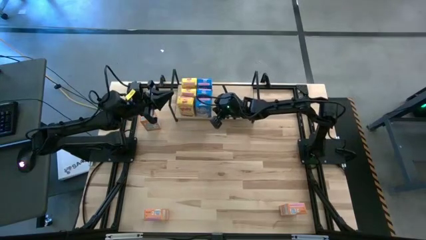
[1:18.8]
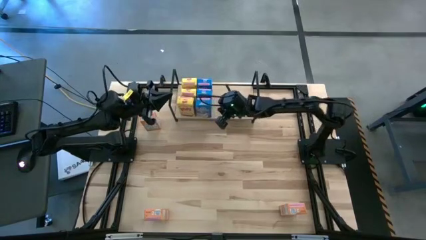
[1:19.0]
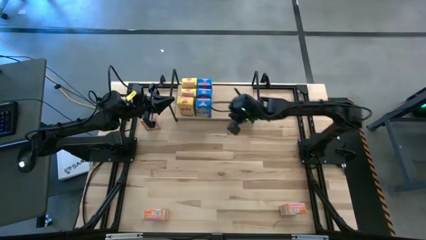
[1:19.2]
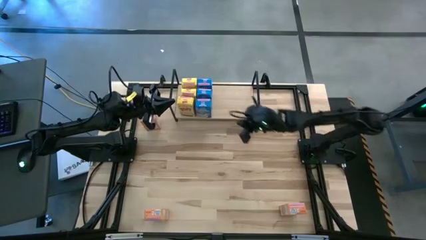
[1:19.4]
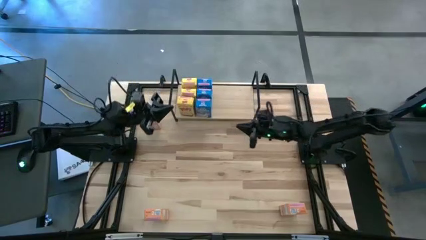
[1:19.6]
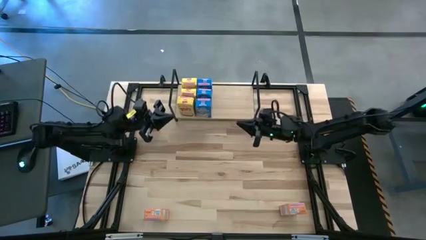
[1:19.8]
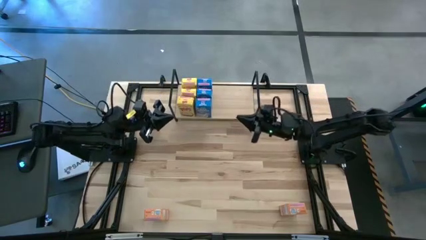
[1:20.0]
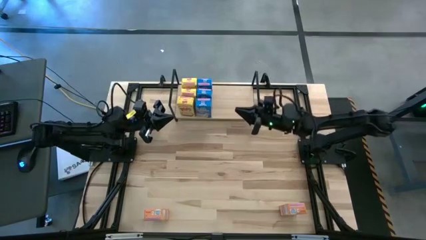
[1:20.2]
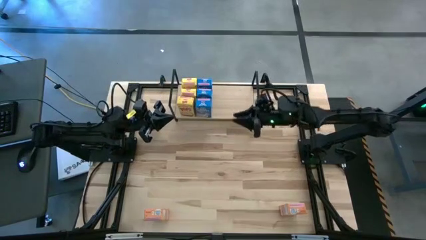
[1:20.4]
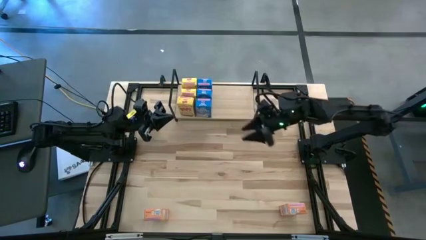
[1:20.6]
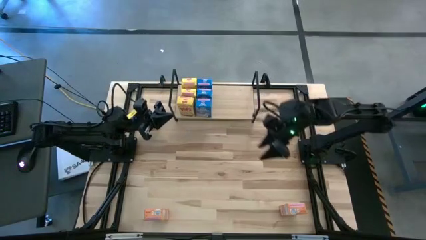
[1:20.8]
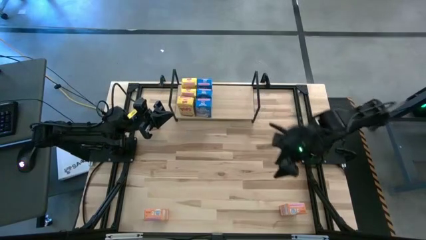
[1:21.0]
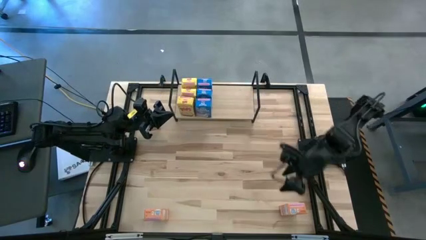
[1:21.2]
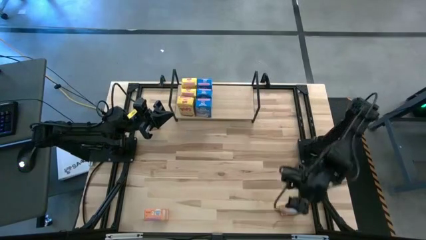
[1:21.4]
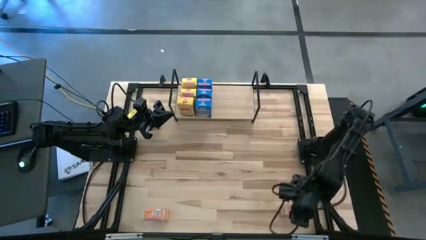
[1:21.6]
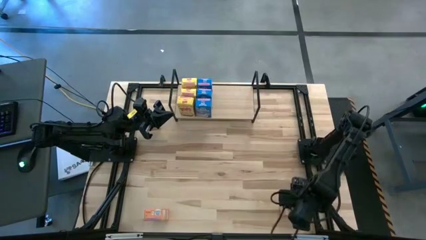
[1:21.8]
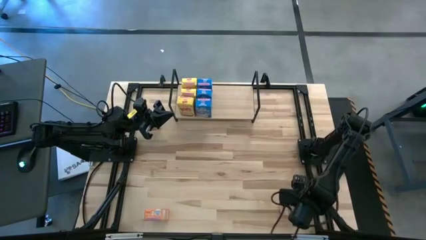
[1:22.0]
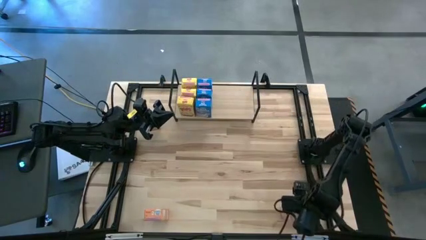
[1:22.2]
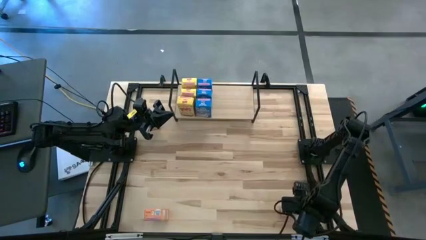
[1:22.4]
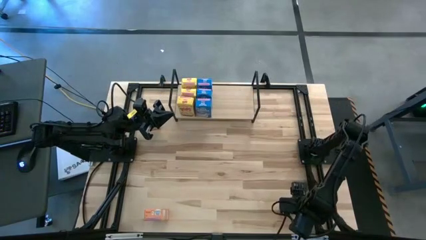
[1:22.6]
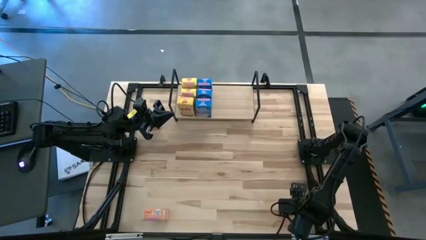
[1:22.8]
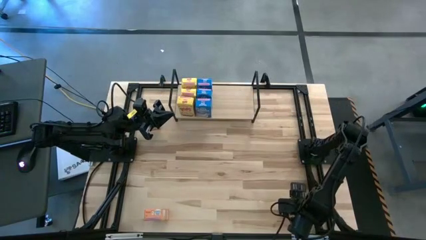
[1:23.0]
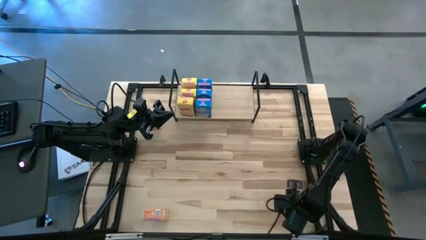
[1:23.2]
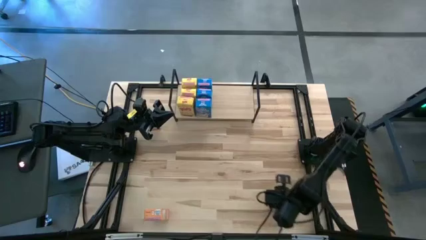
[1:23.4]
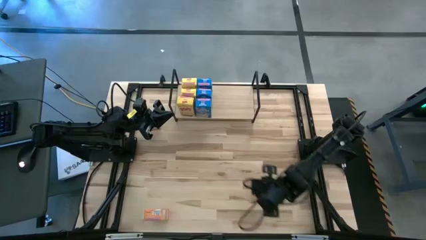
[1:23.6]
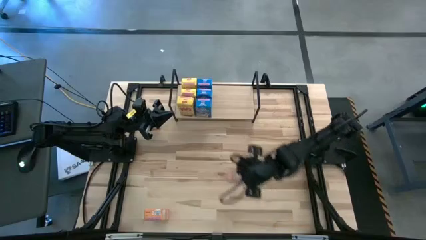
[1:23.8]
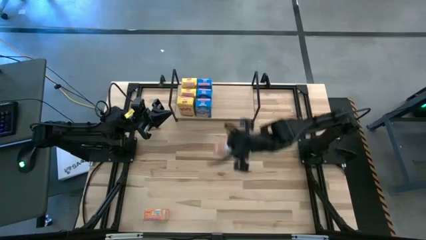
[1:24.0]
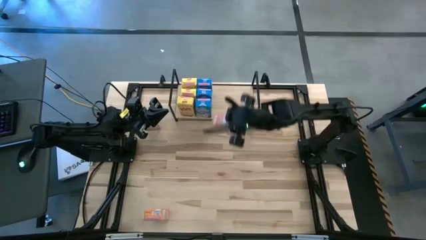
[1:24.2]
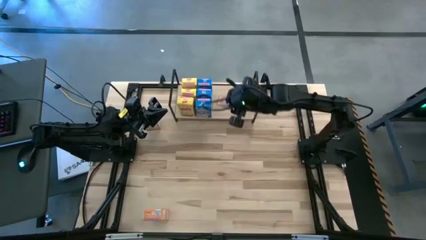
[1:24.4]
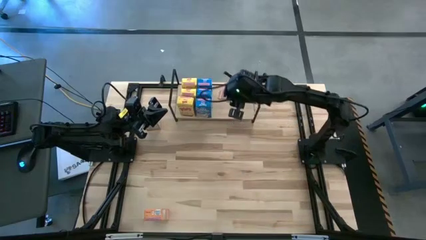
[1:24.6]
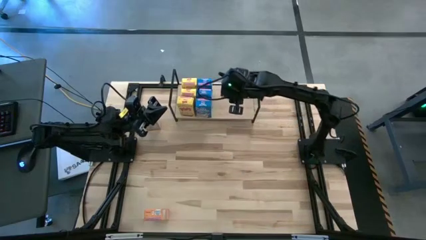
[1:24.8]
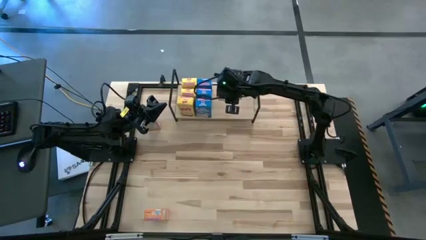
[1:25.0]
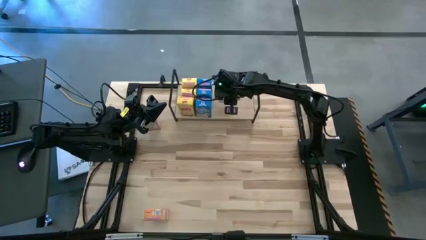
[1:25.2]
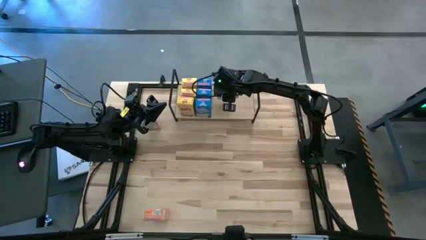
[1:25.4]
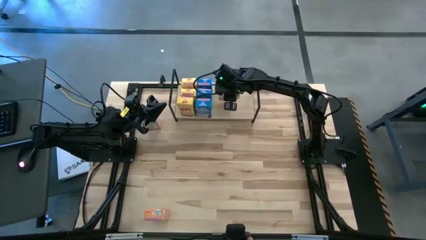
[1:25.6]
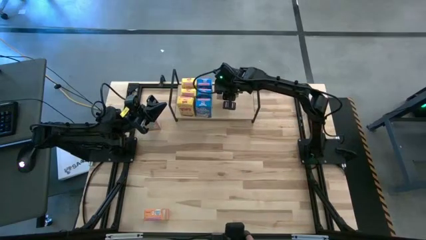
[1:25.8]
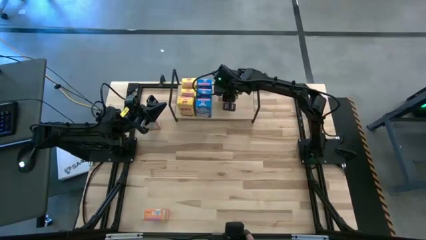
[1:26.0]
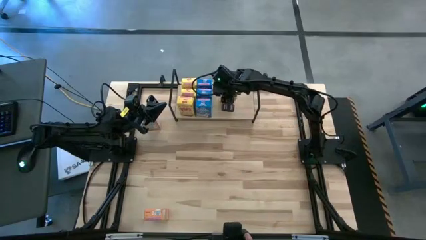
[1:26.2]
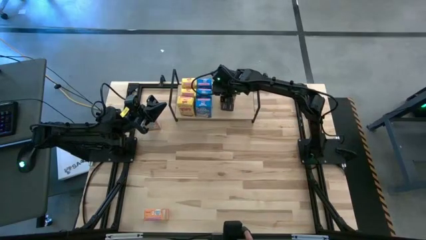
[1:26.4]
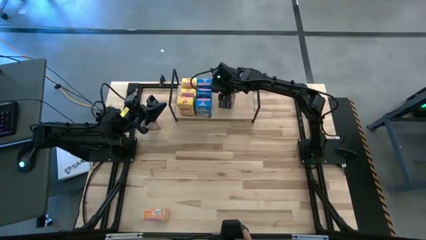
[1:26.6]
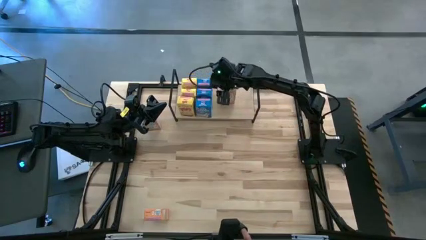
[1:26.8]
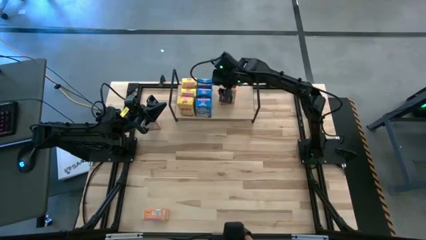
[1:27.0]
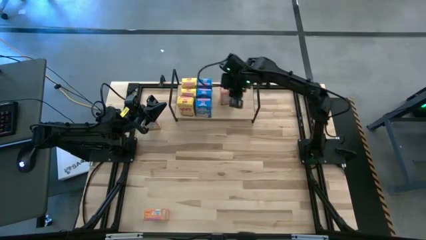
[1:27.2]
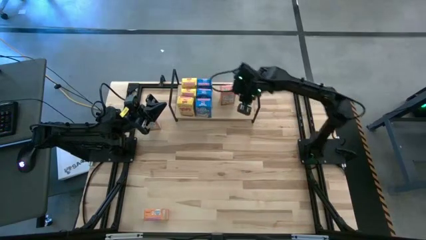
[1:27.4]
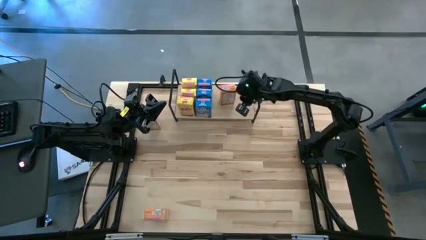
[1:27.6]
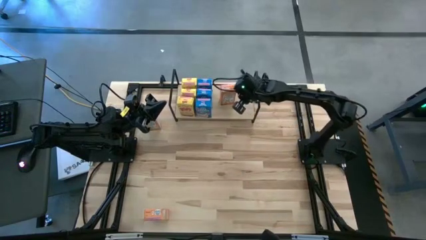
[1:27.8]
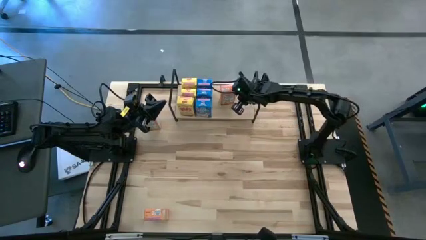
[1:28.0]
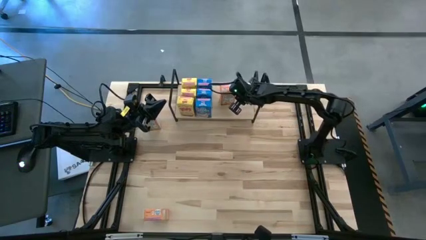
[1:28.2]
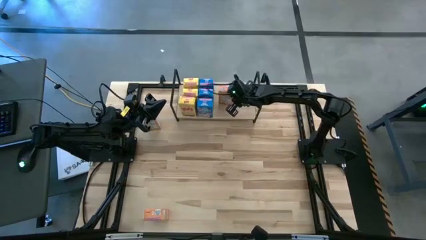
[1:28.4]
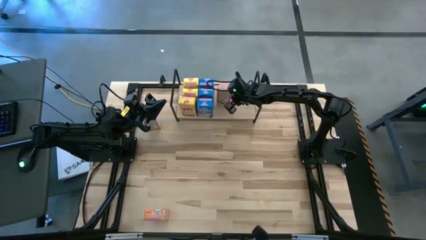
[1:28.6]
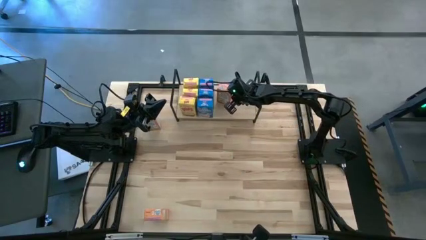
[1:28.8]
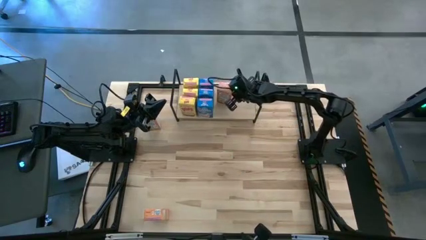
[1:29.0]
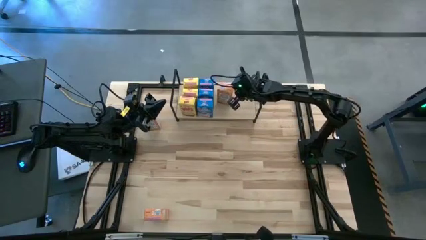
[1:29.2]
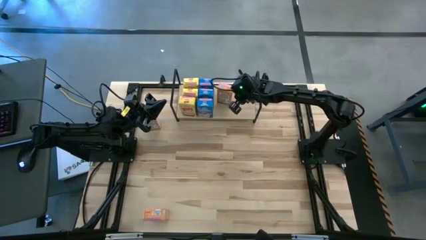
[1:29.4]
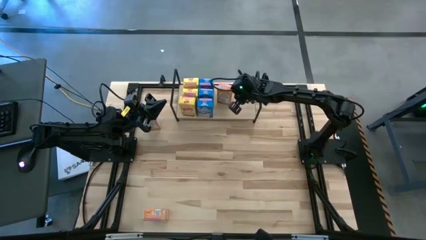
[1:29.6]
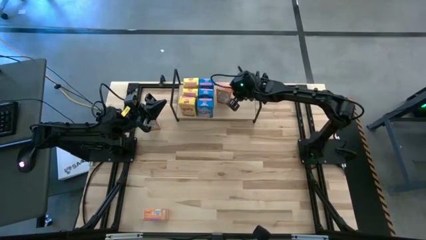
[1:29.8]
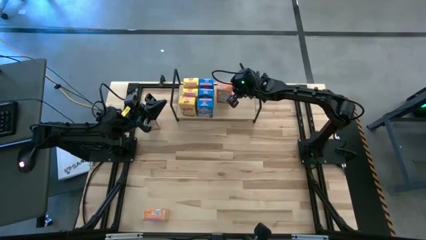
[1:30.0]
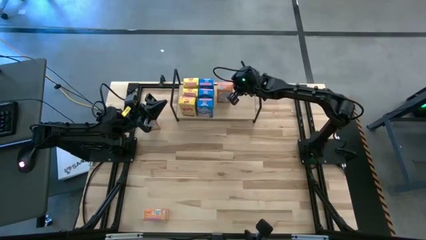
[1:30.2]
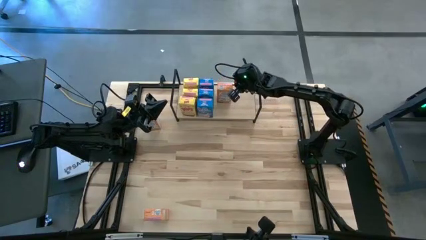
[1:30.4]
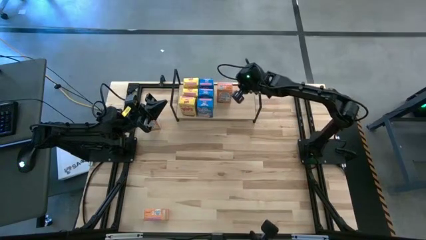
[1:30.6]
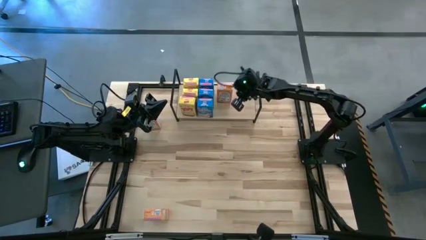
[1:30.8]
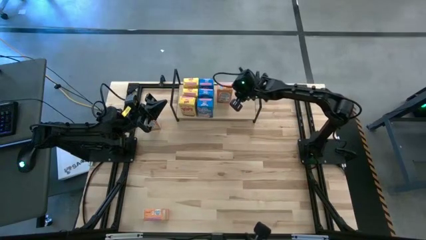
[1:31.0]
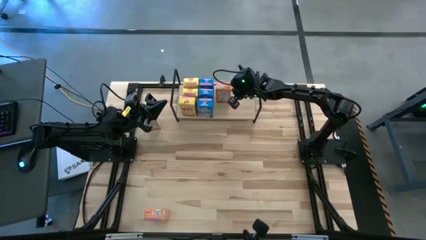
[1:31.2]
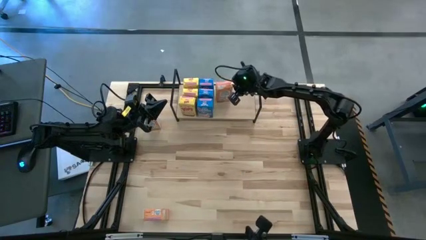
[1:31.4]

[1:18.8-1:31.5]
Task: Stack cereal on shelf
Put the bottom right orange cereal box on the shelf
